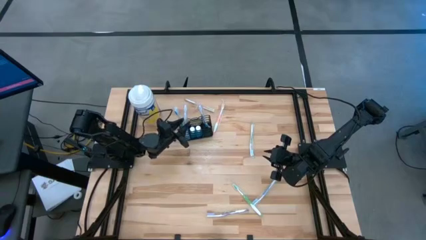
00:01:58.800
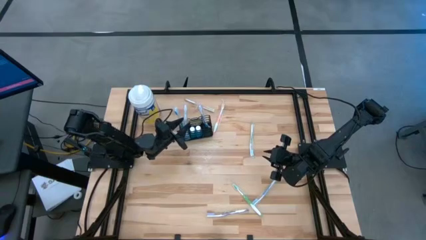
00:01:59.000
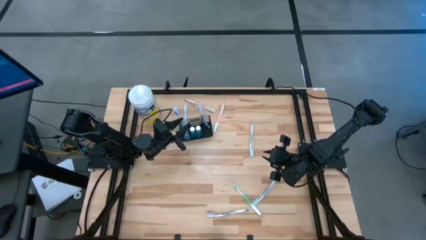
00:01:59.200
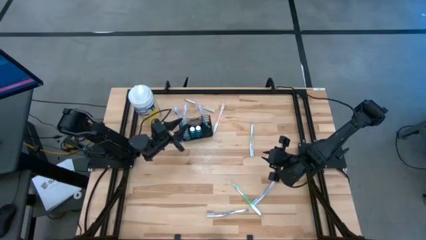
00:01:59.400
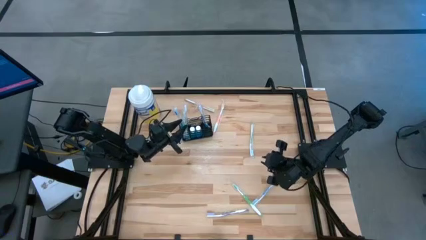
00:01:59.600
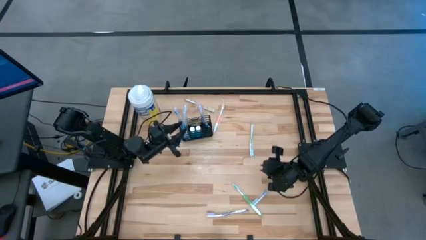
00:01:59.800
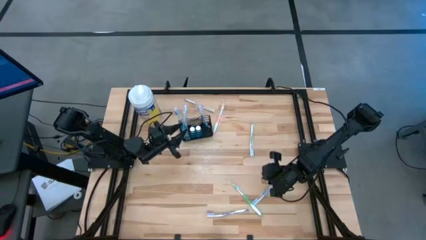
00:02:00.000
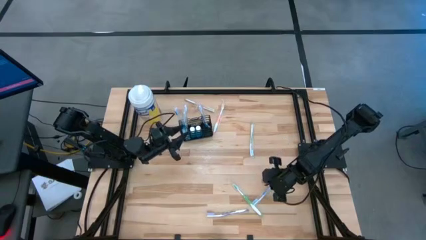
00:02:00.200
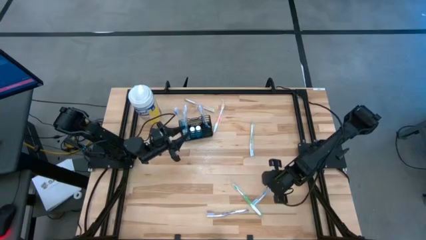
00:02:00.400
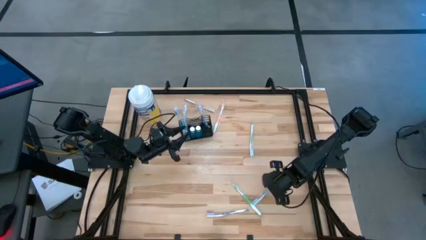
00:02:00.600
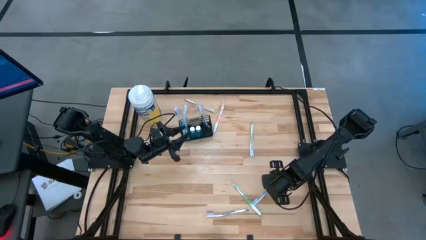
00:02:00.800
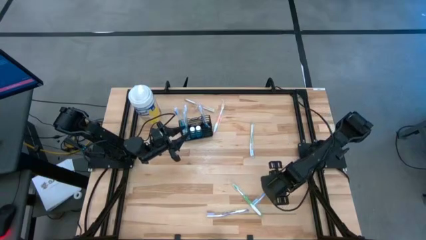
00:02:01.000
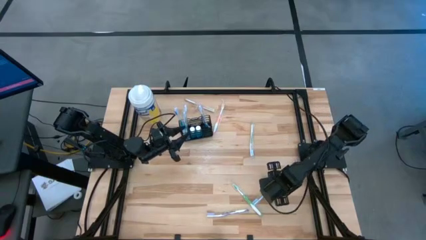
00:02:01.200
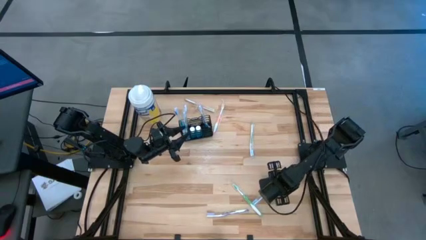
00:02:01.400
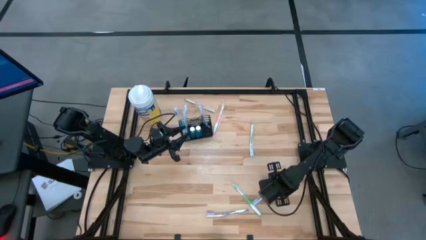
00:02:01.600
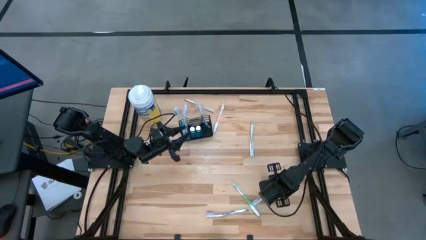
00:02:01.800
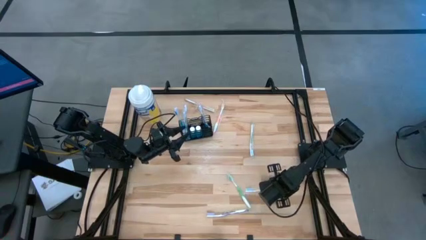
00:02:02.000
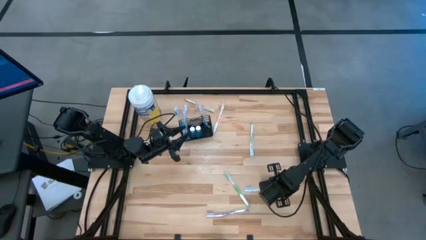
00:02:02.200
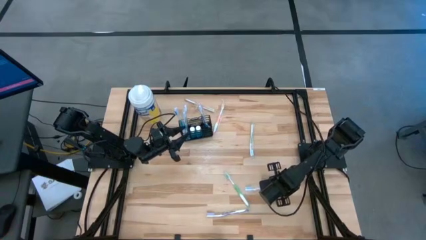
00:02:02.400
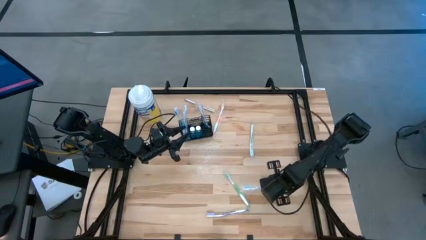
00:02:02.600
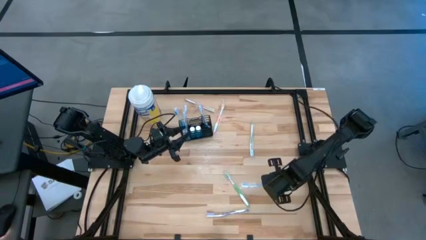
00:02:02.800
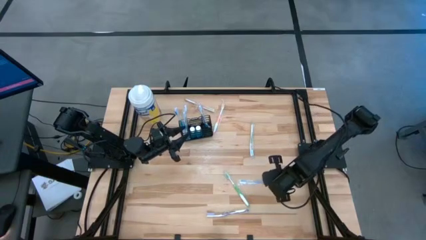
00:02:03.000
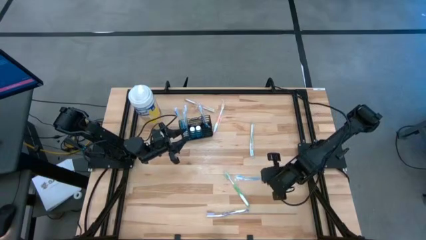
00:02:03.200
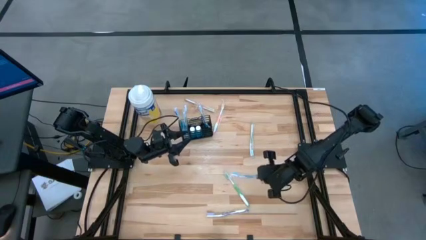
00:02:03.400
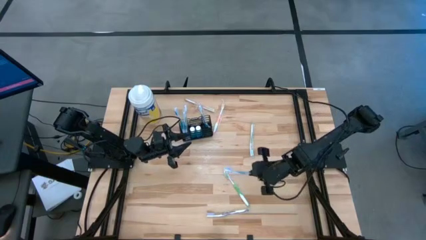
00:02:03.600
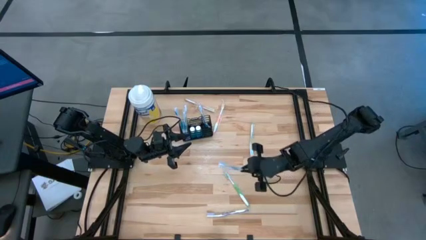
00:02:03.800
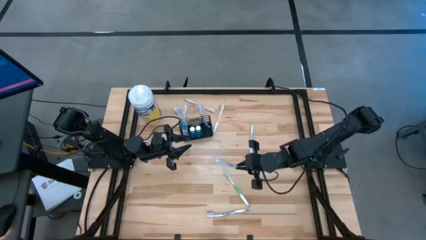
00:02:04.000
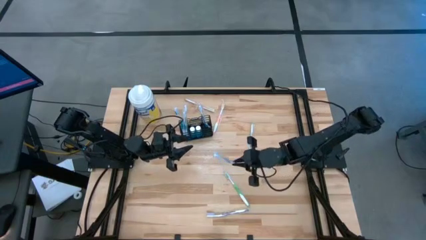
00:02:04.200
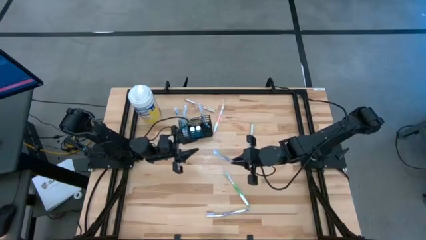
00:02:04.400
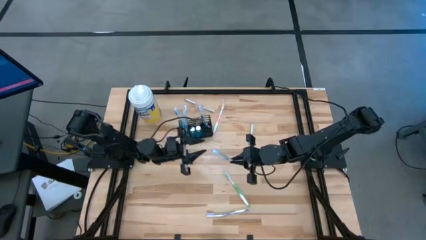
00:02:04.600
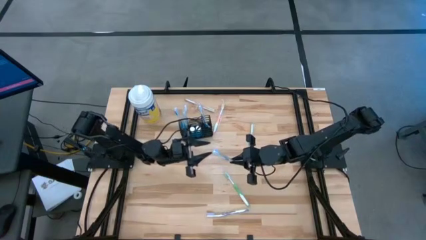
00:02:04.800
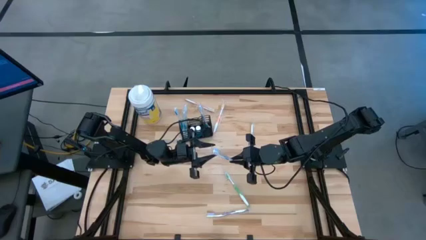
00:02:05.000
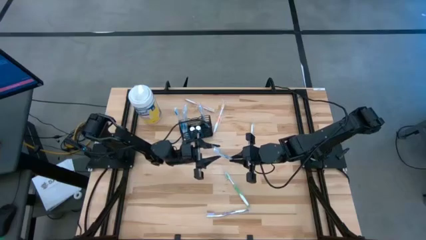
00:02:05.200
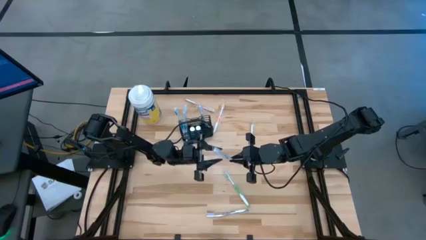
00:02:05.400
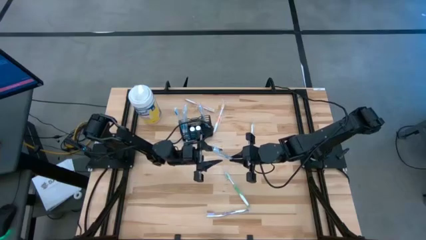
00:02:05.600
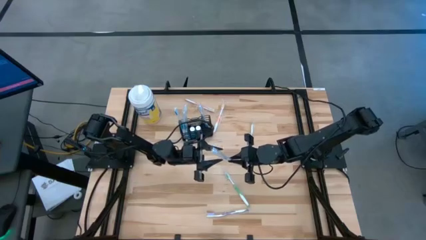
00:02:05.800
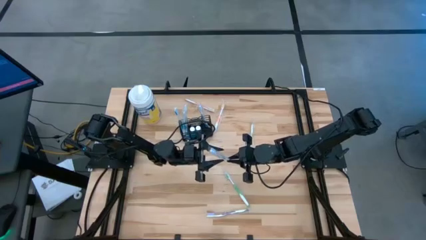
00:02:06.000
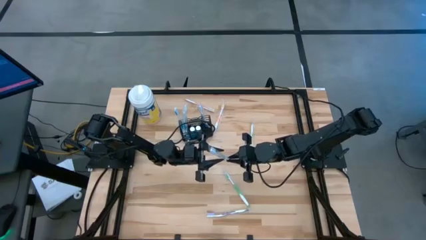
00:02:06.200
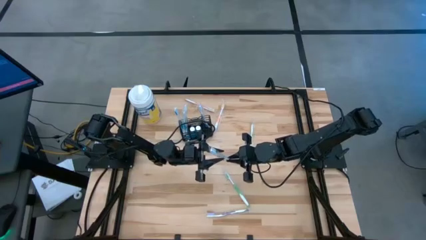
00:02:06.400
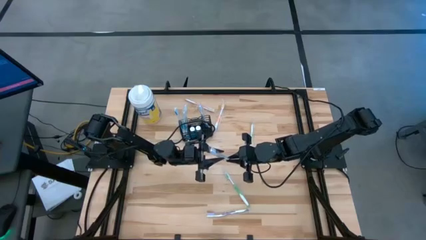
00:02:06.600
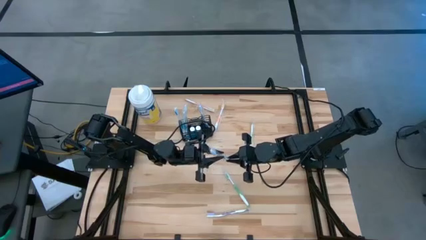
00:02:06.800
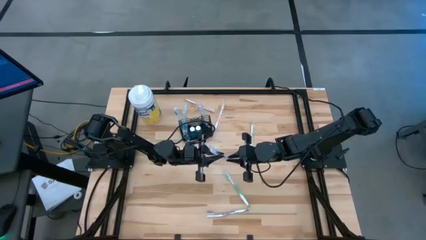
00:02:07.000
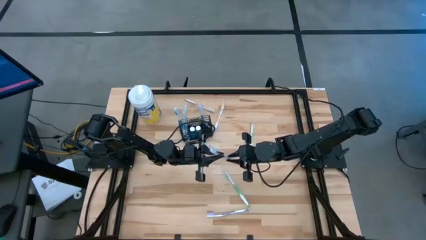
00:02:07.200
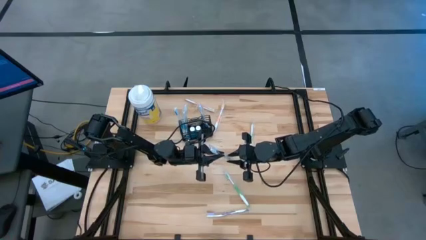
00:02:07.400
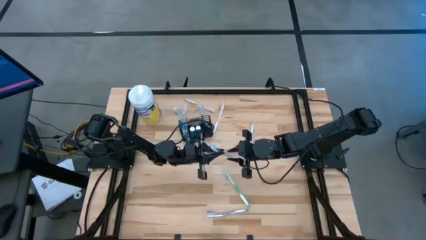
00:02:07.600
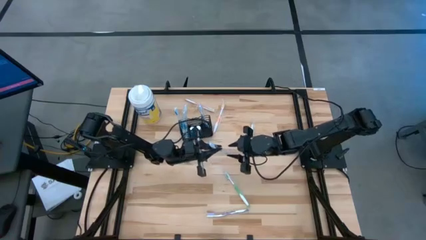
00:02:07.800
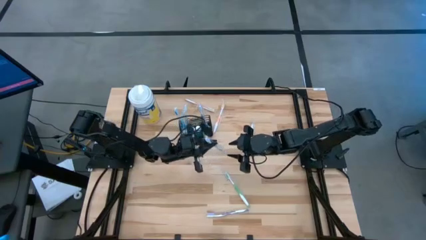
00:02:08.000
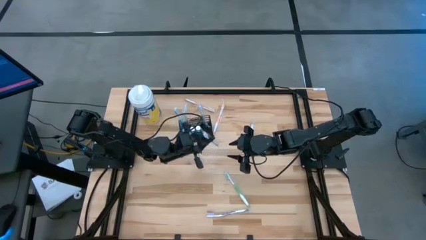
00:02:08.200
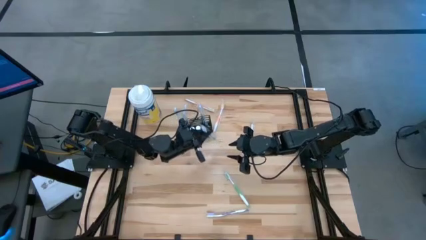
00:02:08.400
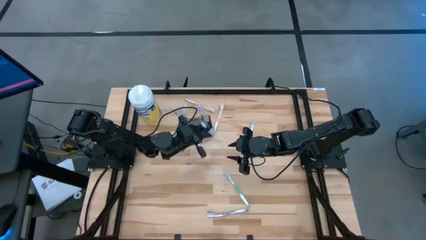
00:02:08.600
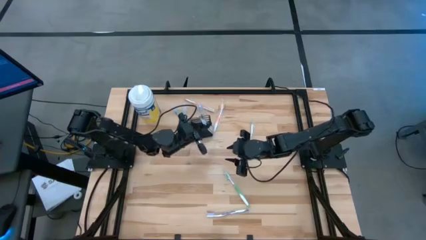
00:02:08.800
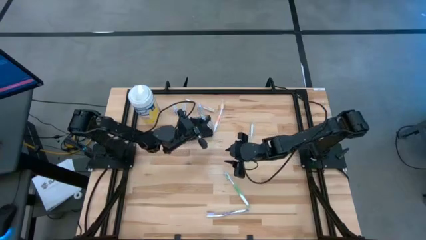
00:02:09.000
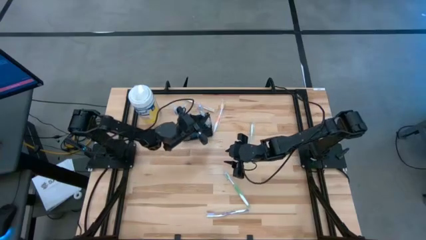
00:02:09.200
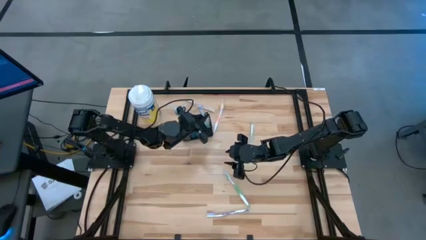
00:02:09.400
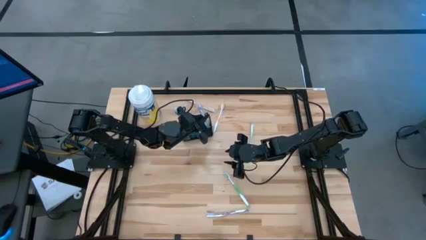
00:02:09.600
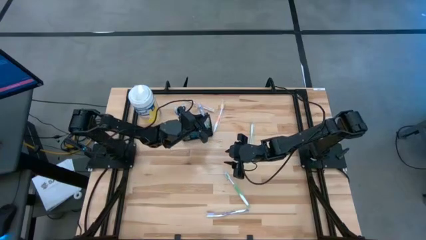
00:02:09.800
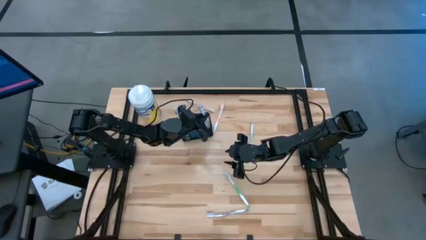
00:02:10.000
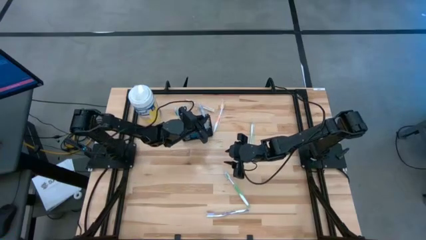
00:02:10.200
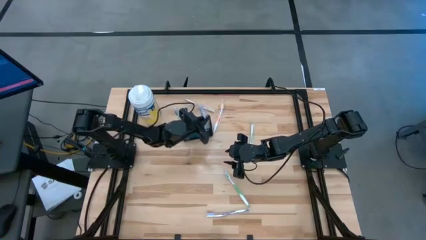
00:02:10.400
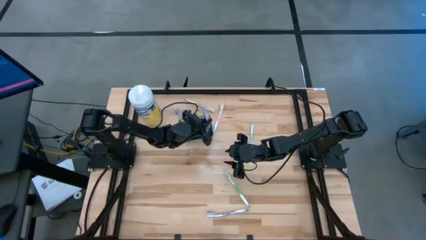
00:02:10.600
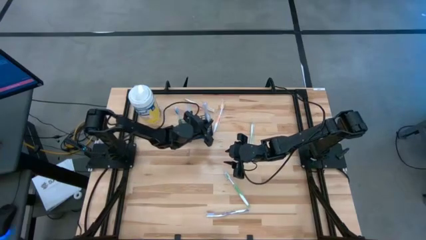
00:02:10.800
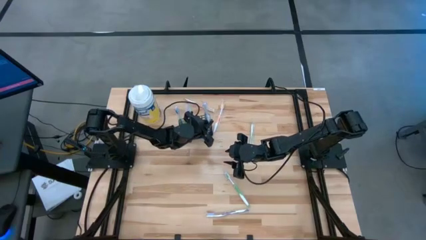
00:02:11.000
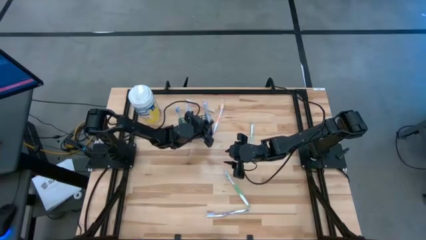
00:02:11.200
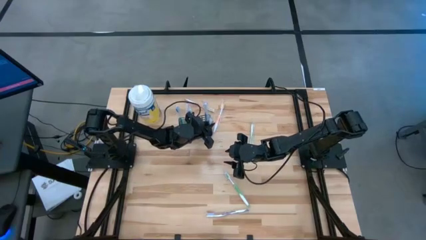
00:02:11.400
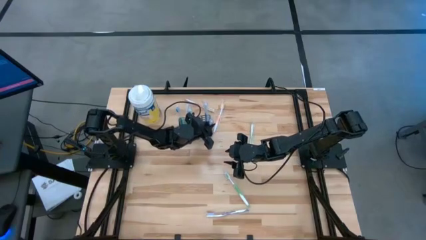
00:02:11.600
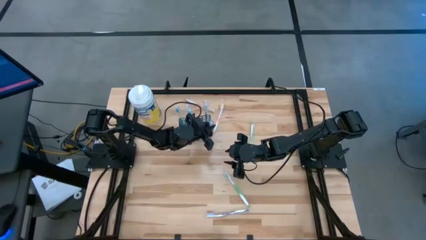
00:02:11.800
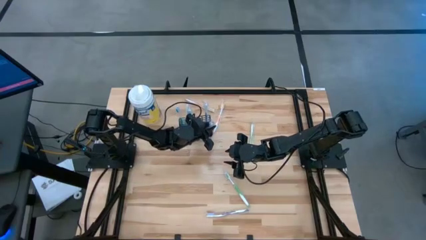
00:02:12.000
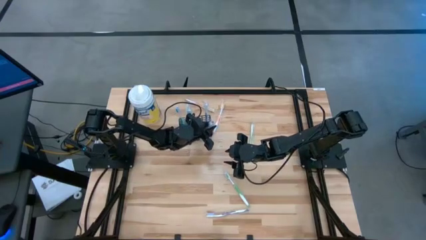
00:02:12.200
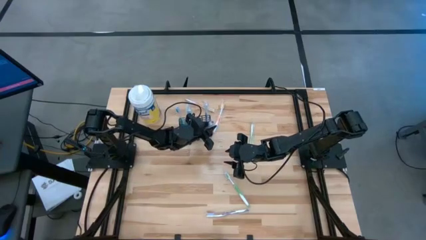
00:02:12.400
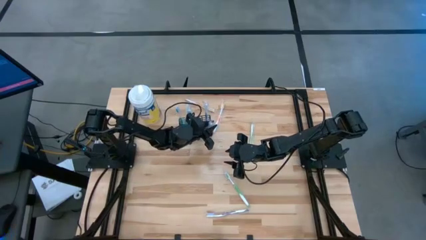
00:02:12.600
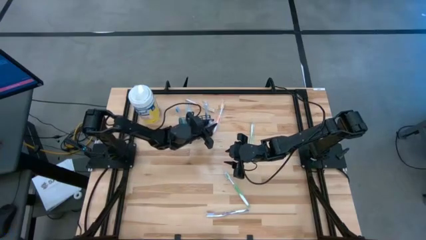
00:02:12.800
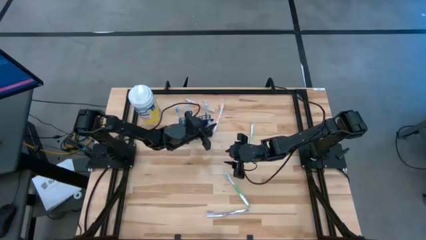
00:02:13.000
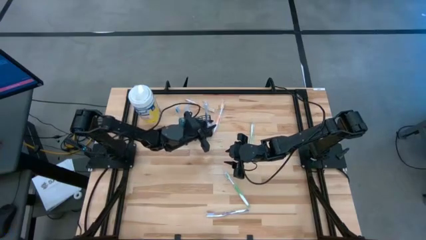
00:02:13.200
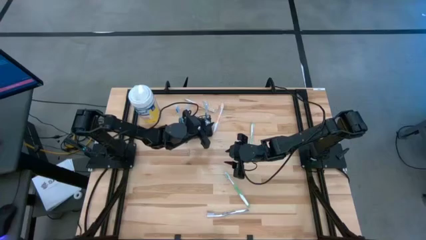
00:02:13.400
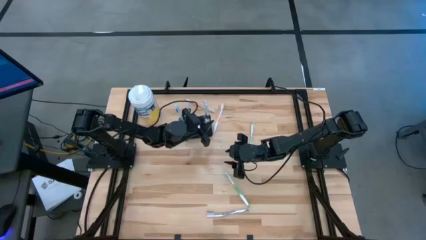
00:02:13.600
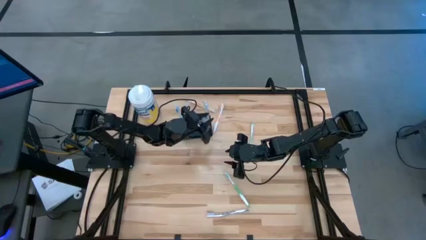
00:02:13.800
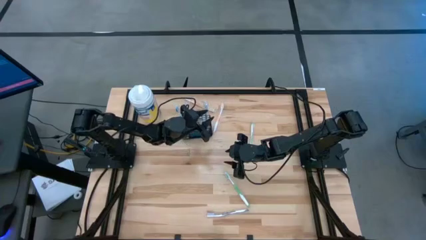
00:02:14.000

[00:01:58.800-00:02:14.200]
Task: Pick & Place toothbrushing station
Put the blue toothbrush into the mesh organizer
